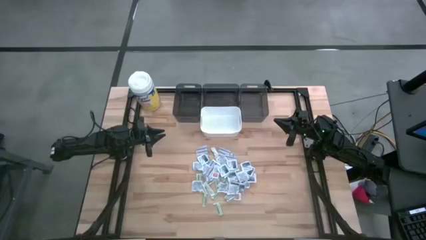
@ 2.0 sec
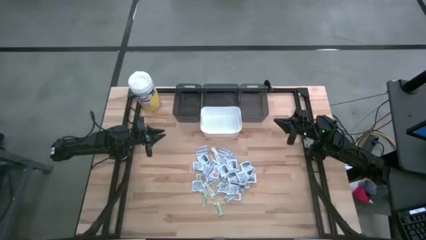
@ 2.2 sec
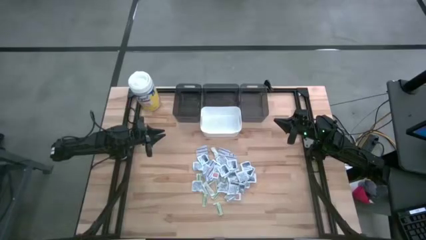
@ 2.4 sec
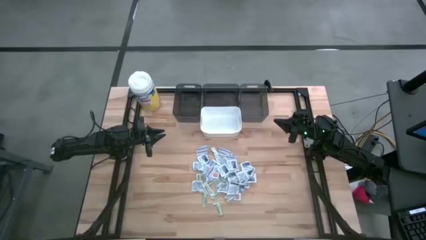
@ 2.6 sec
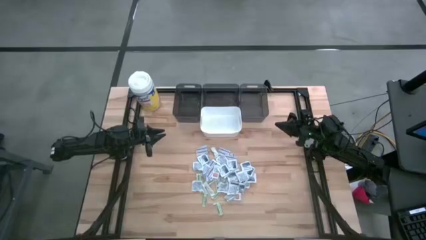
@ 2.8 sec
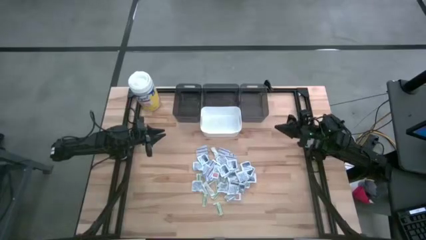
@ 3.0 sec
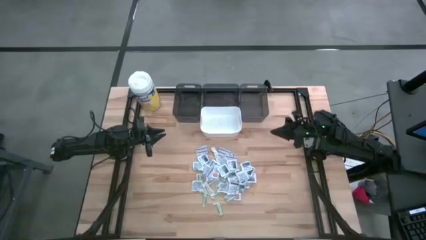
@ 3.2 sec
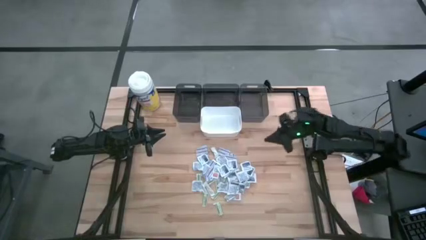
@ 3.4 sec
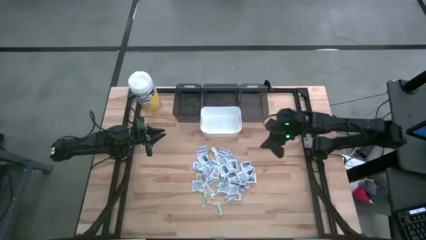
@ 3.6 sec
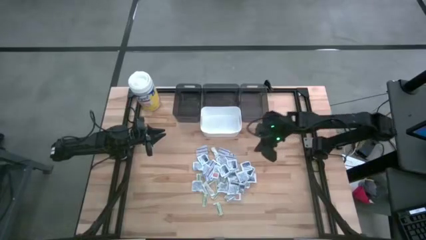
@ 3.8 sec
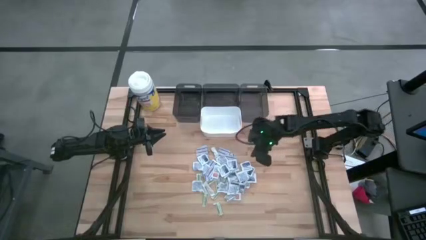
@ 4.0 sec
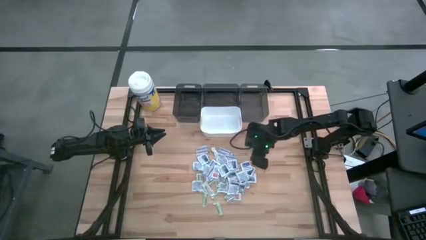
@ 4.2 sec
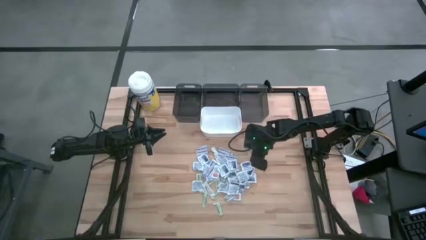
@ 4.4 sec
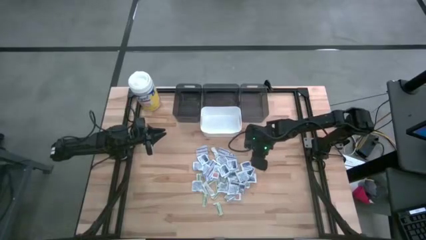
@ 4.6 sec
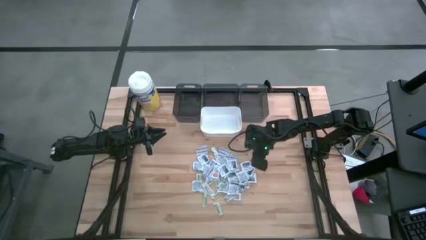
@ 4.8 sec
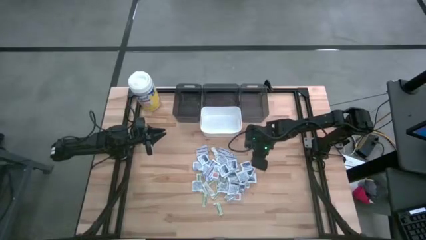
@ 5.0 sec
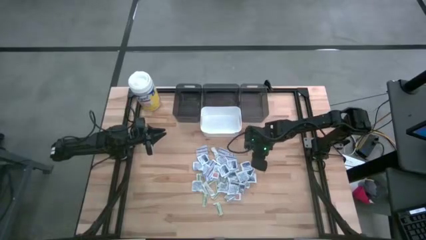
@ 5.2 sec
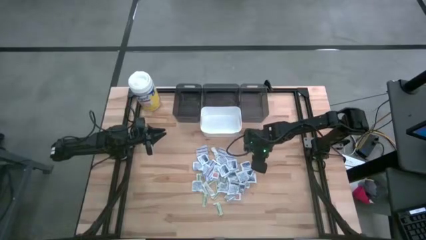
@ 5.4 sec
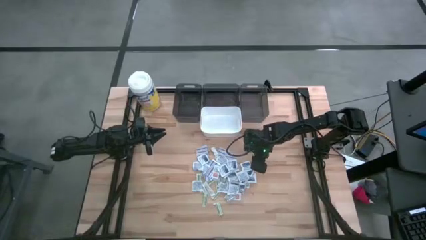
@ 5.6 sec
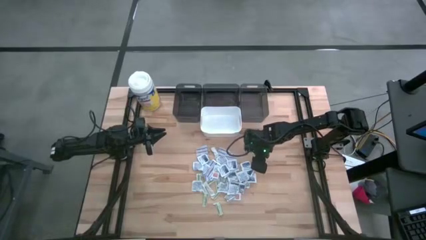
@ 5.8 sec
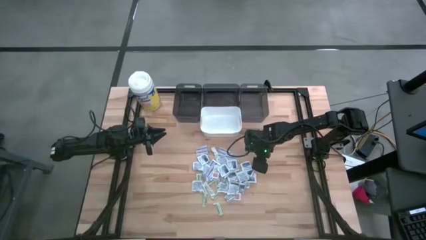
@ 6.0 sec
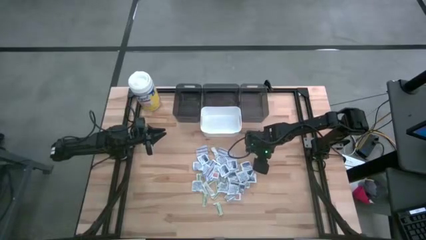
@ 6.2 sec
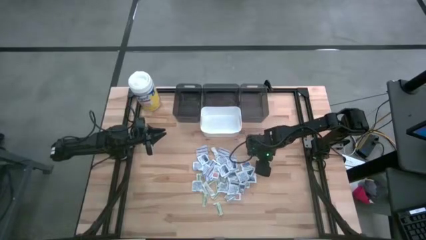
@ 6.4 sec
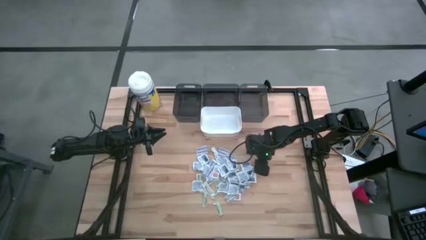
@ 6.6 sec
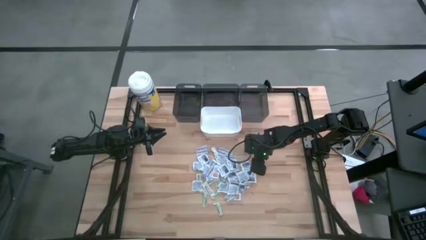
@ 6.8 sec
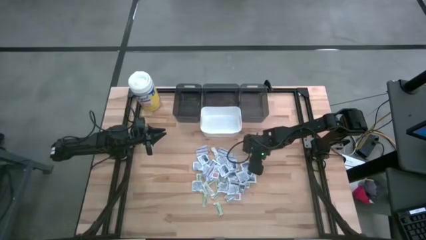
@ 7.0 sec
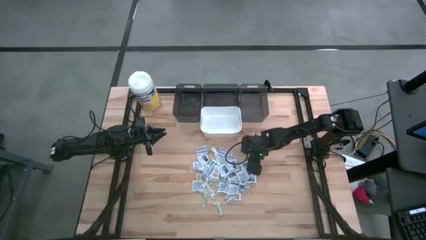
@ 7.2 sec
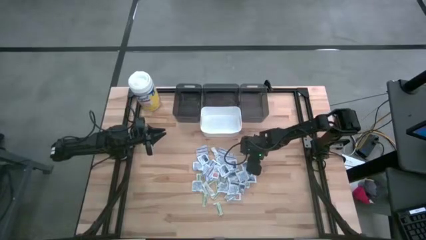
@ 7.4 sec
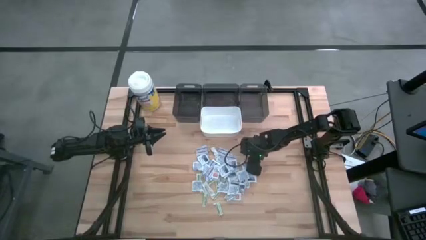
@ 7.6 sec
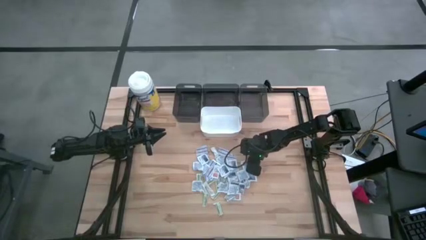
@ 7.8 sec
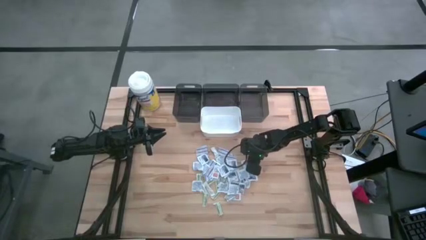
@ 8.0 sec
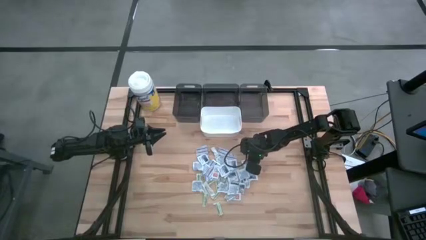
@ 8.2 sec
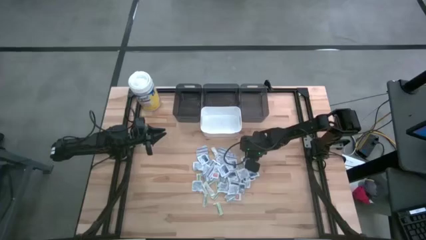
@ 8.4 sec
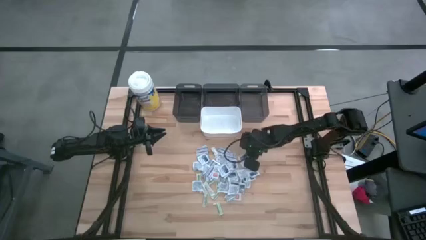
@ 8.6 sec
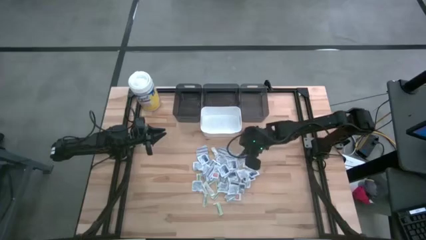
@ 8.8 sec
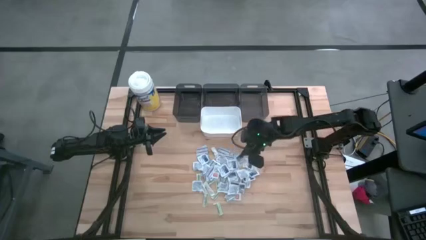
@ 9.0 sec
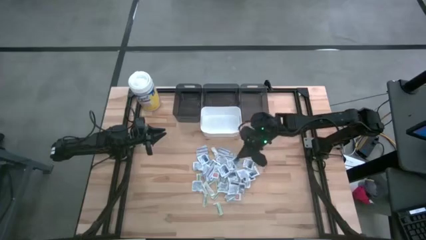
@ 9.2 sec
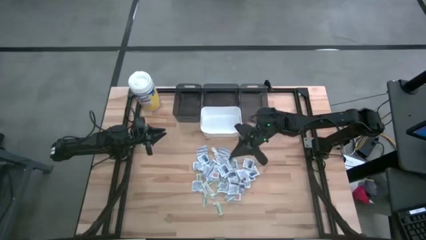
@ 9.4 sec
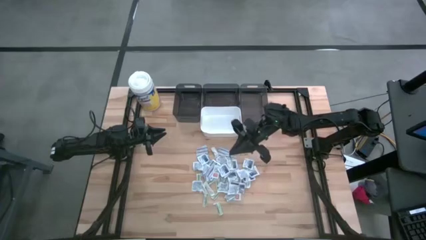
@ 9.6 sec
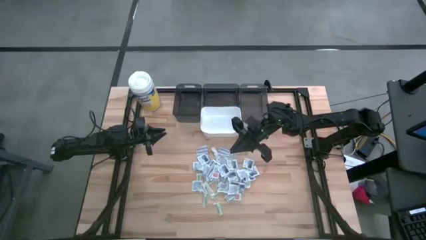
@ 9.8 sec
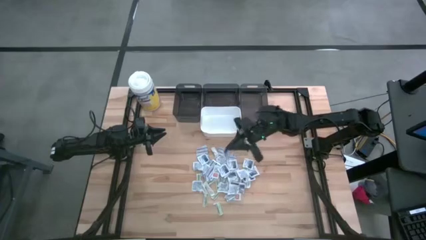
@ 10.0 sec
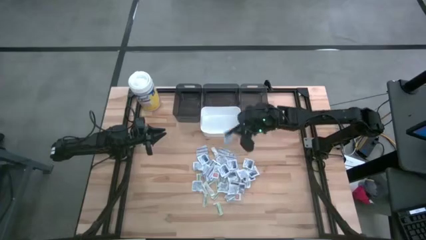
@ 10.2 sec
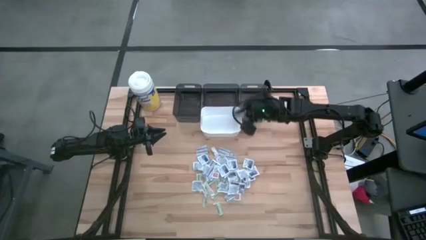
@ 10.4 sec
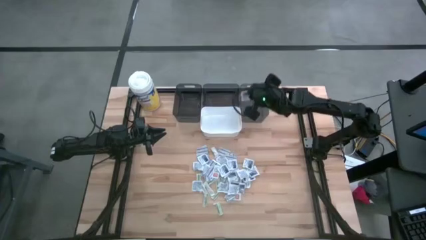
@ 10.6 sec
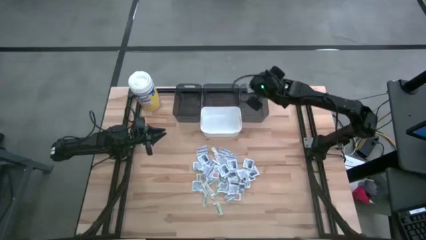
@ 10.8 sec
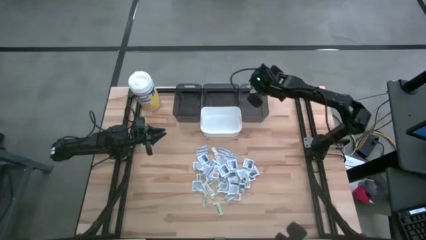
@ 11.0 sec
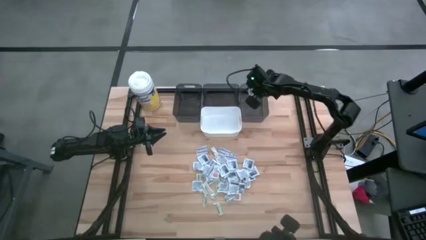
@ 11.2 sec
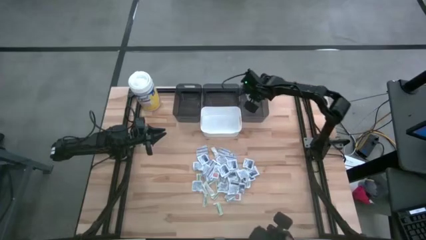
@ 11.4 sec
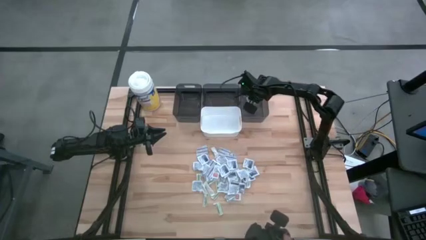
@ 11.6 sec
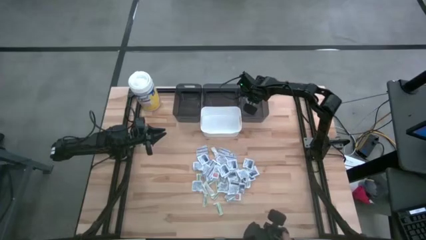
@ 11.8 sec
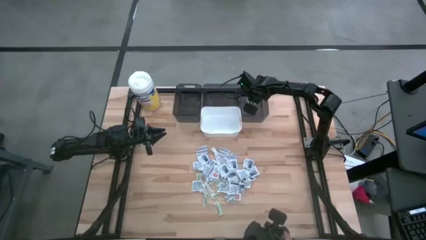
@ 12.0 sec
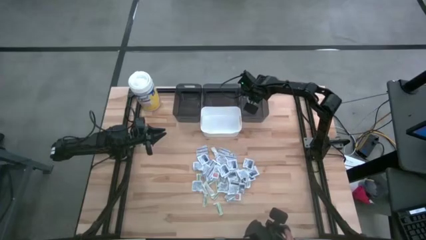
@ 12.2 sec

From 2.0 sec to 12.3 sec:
Task: Pick & Place First Aid Supplies
Put the blue alcohol pad into the right black bin

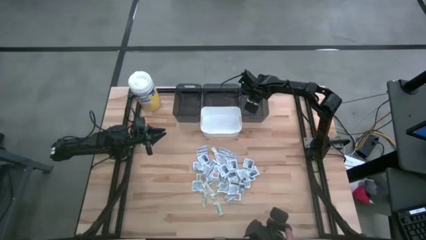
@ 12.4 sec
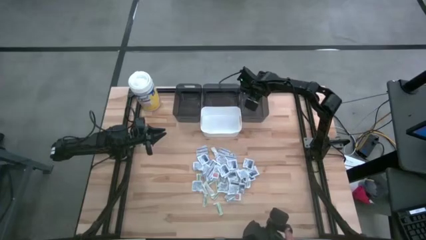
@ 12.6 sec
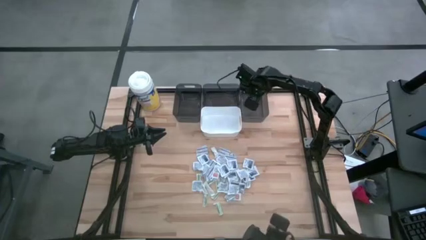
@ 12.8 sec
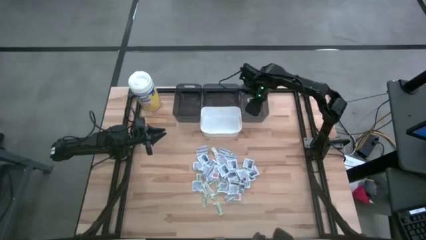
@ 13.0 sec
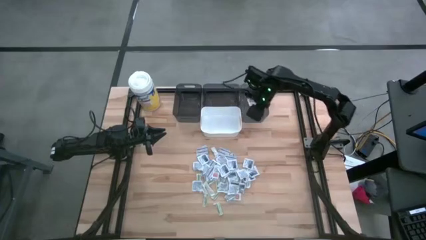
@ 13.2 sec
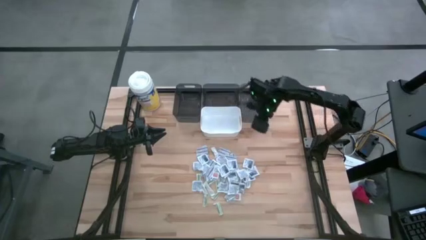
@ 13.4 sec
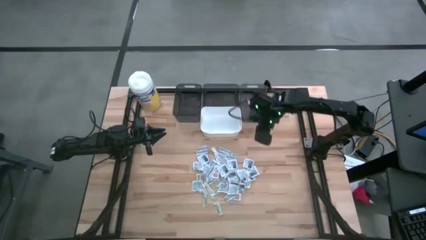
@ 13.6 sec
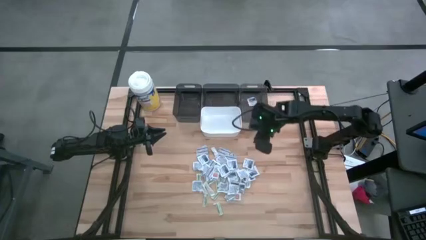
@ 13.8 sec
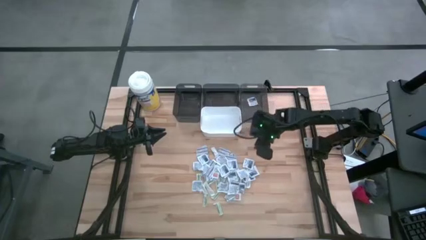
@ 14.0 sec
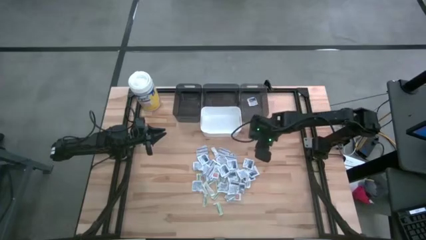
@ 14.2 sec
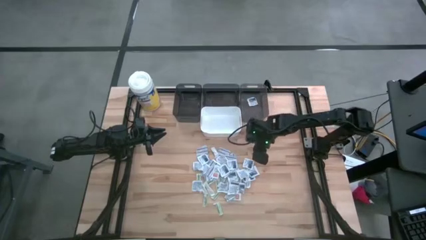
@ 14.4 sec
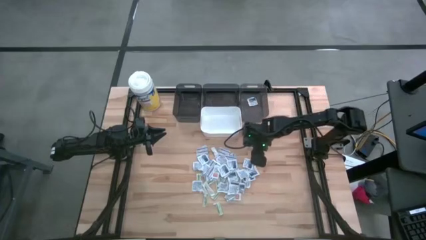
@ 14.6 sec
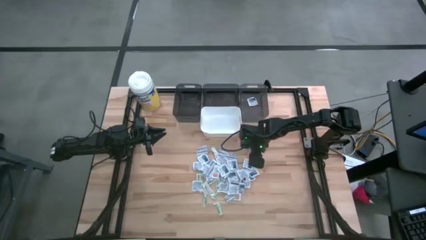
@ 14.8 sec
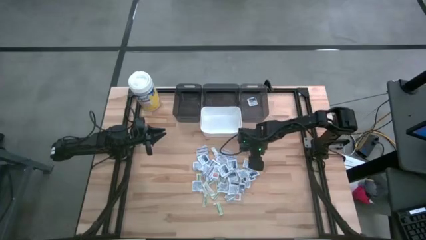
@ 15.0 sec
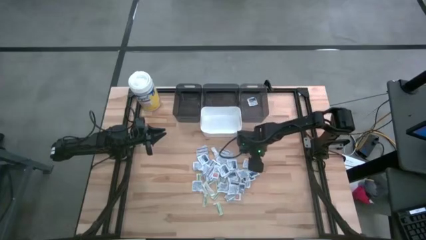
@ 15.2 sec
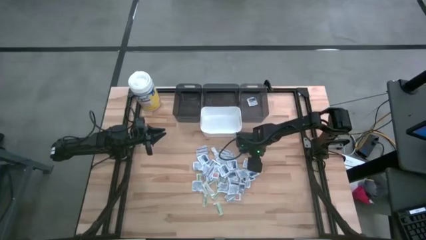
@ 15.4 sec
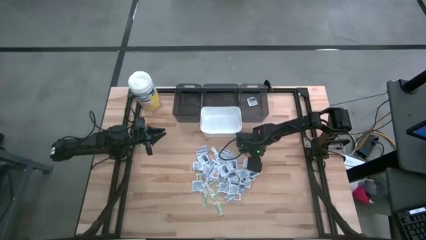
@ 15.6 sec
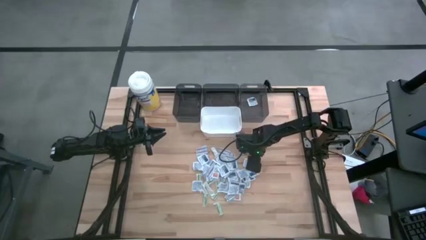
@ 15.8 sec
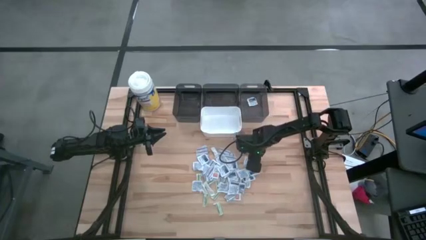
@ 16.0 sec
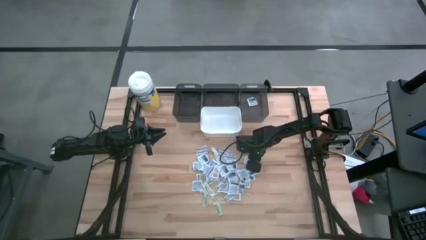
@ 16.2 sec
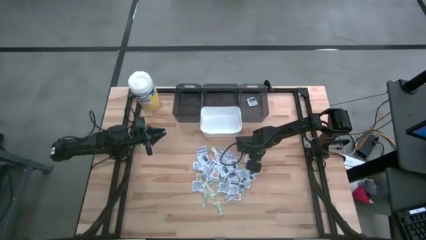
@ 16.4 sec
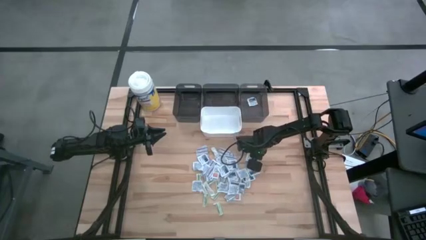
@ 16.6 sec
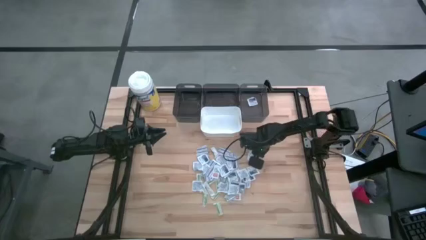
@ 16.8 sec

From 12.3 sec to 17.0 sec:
Put the blue alcohol pad into the right black bin
